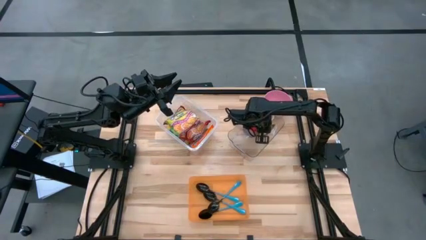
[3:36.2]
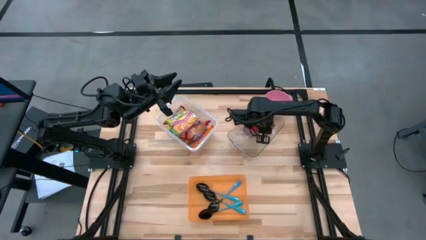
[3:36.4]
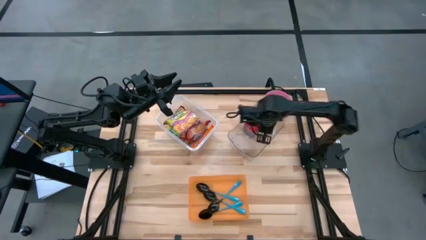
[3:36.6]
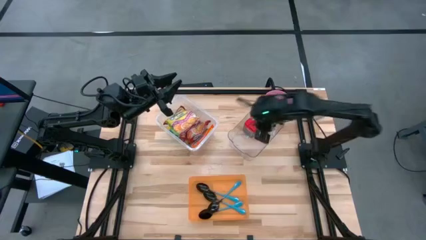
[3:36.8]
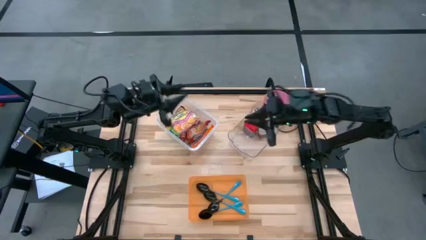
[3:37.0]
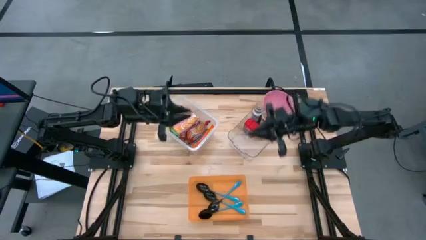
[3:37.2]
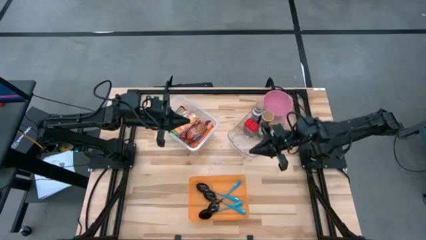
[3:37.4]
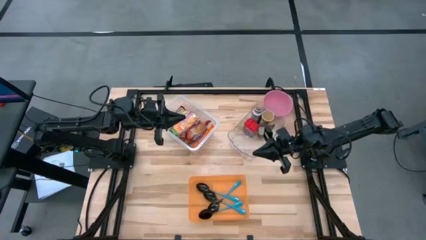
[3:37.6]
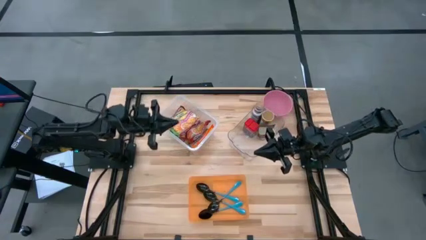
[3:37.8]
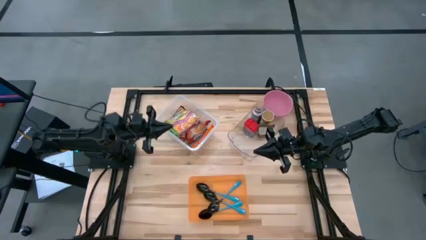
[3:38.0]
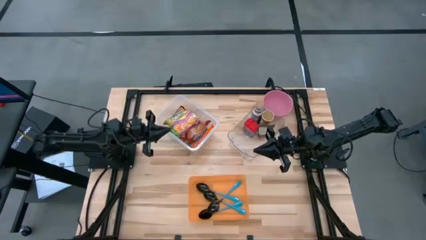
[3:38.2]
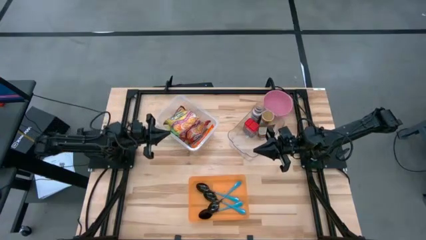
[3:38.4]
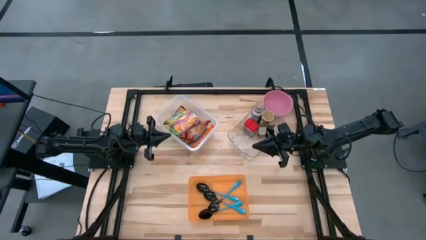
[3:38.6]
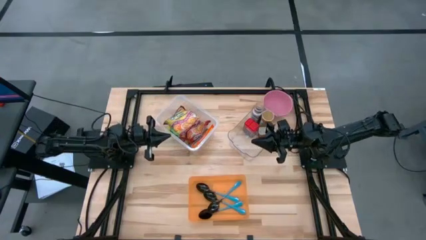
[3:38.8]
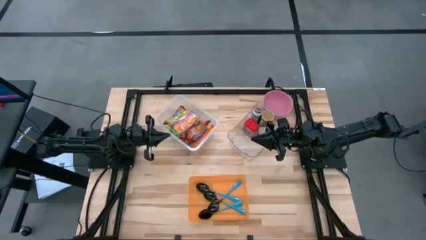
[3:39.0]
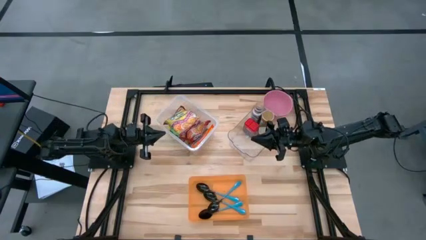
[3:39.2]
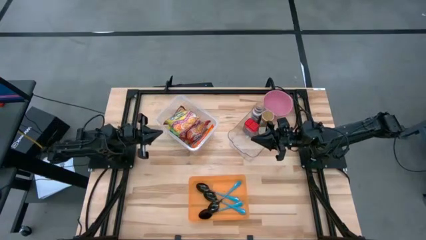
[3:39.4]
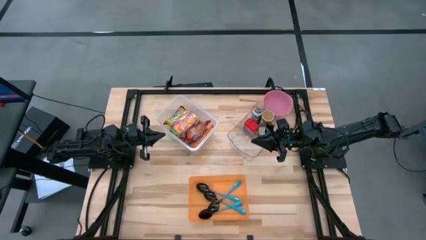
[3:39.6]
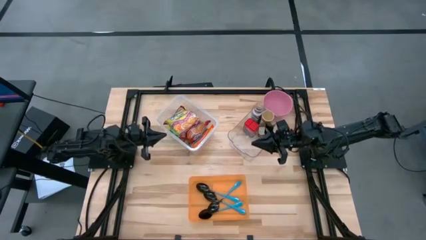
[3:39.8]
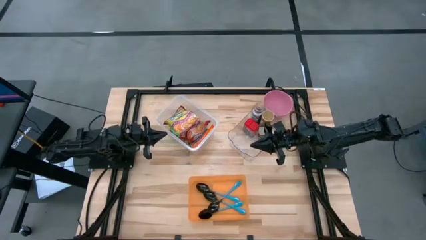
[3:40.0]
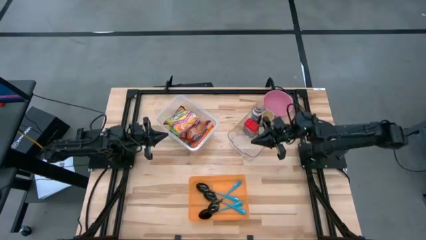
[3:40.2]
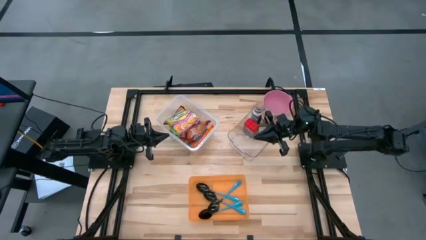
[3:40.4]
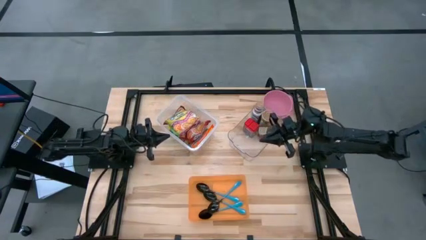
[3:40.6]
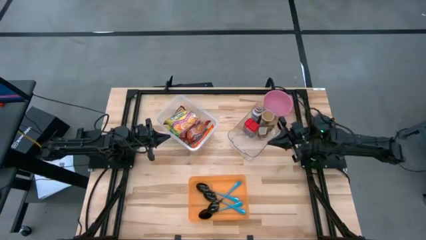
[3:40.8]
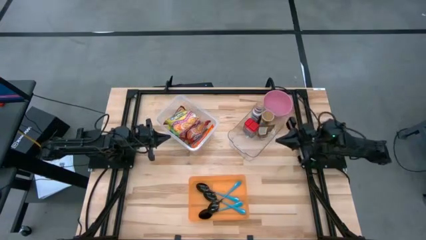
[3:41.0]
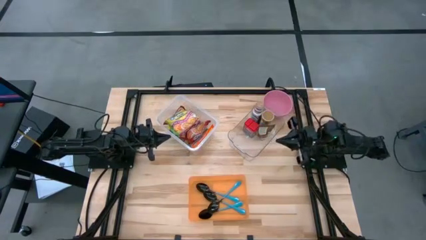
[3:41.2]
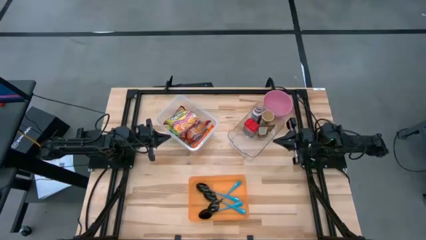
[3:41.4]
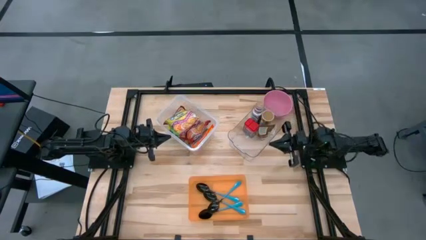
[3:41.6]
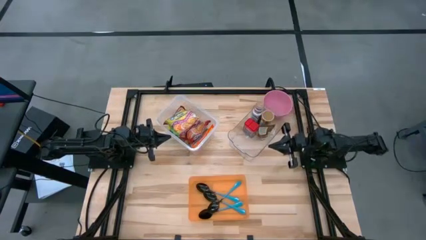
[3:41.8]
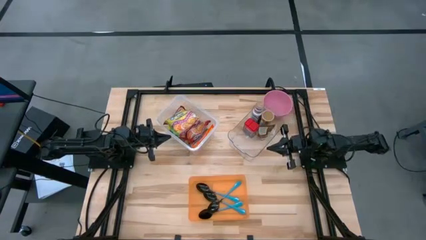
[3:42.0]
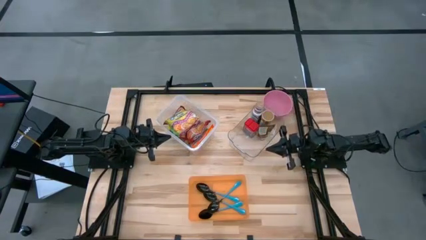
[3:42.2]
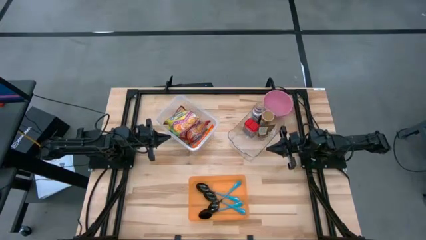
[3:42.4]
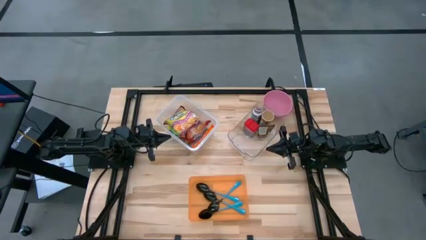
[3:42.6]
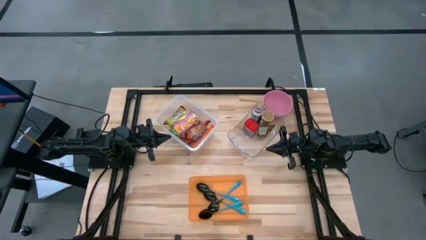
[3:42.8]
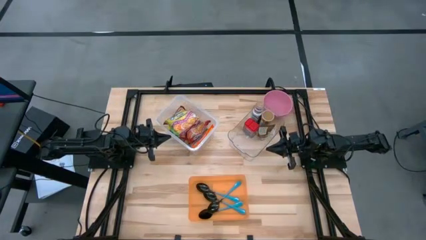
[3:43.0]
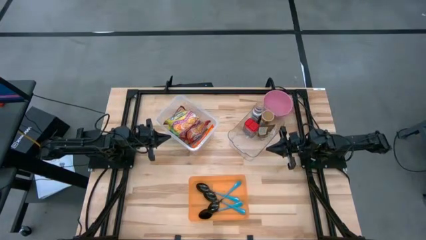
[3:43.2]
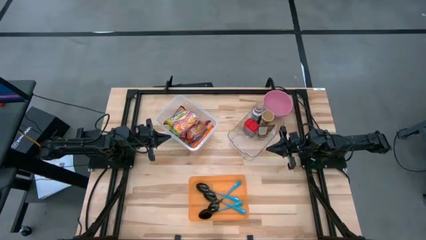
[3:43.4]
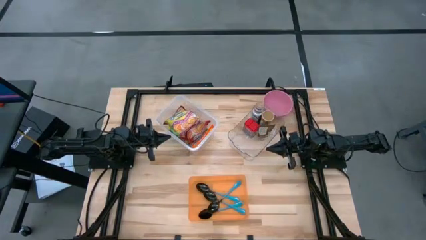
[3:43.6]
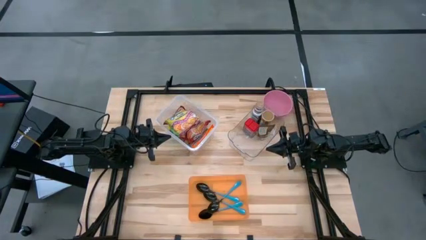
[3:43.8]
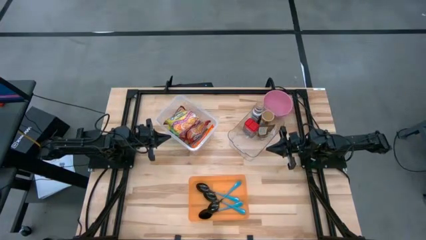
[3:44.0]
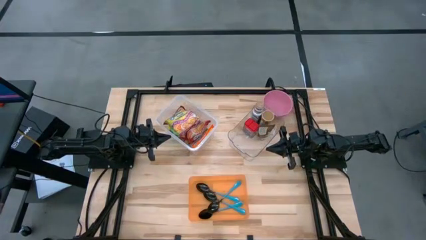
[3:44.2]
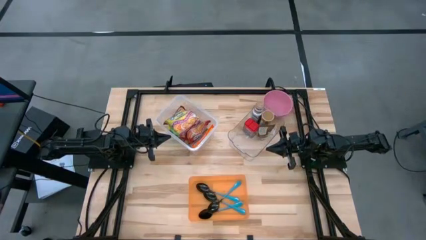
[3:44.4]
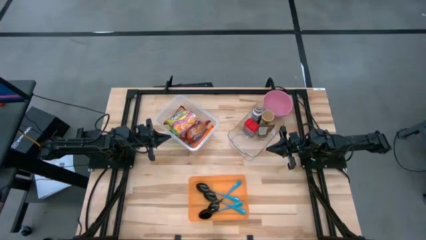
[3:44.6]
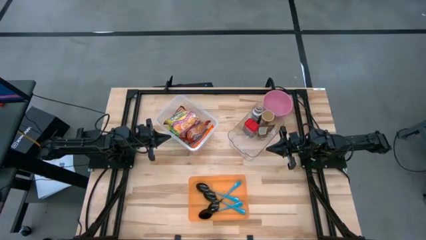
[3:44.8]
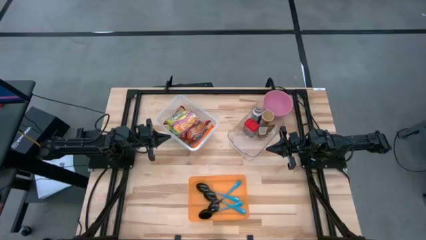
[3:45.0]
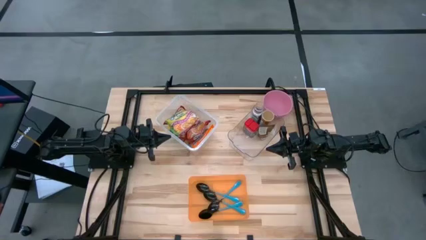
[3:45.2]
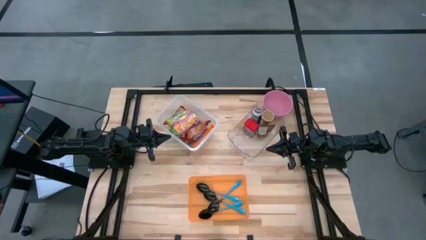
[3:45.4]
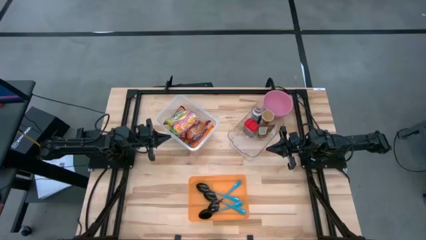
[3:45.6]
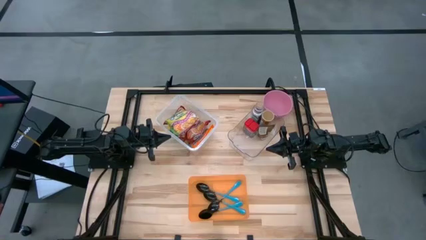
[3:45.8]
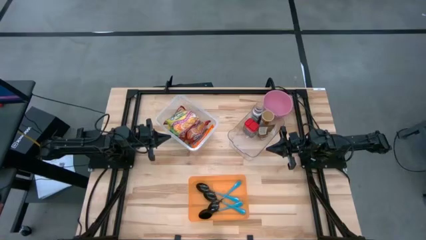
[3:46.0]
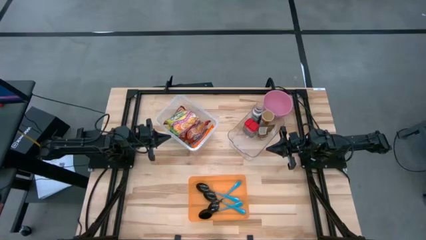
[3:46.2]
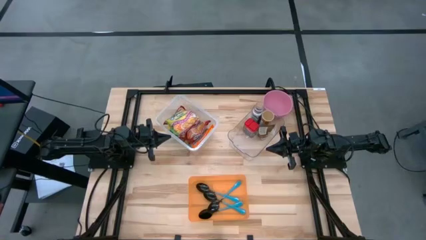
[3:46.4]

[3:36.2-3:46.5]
Task: Pick & Place Food Item
Return to Home Position

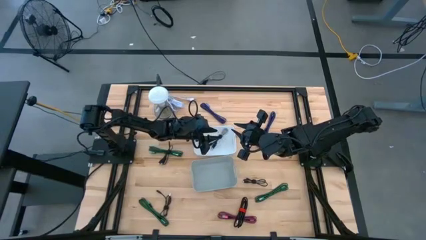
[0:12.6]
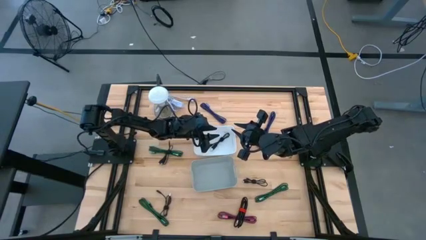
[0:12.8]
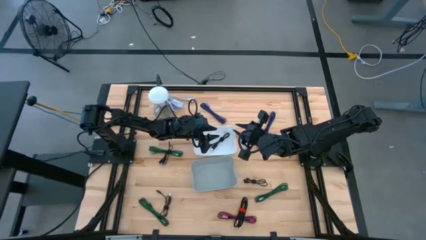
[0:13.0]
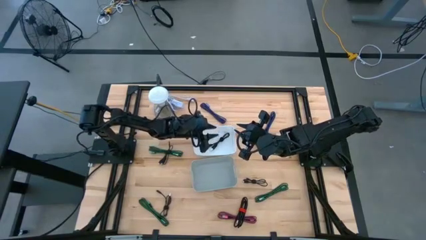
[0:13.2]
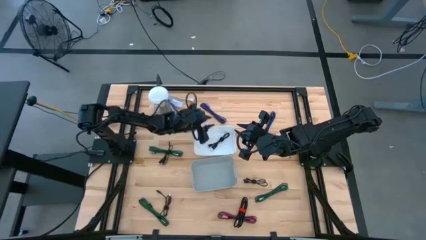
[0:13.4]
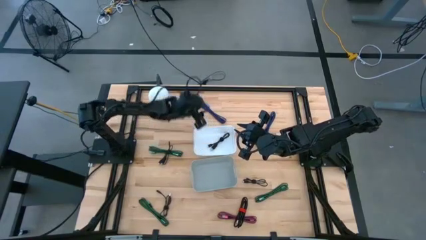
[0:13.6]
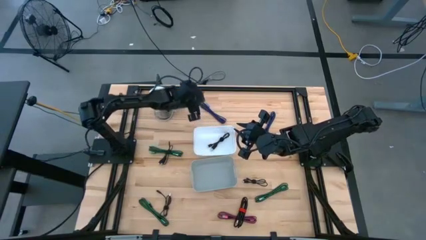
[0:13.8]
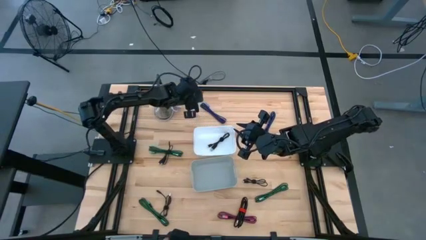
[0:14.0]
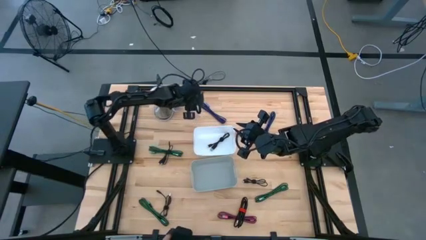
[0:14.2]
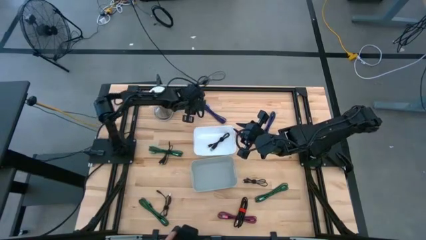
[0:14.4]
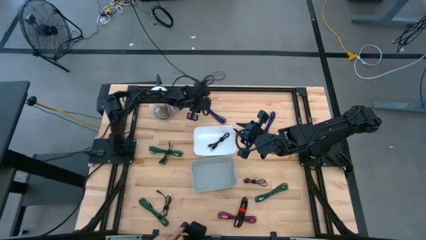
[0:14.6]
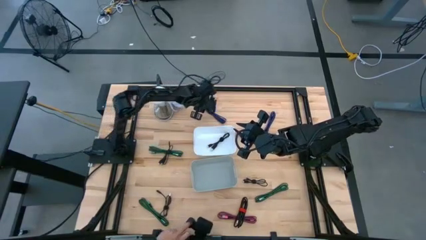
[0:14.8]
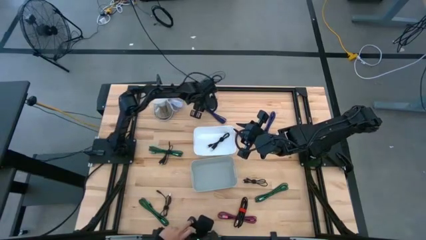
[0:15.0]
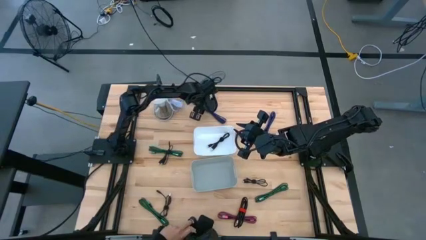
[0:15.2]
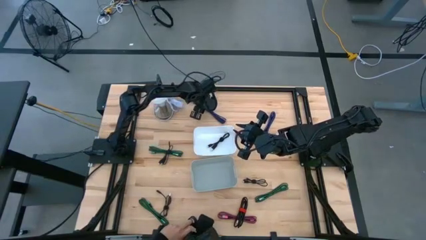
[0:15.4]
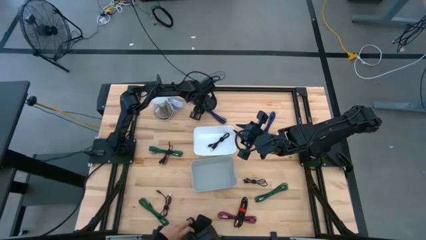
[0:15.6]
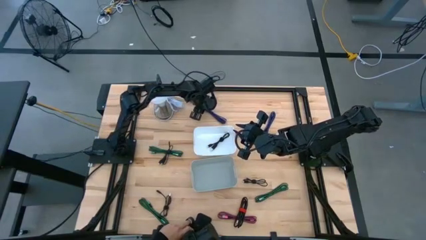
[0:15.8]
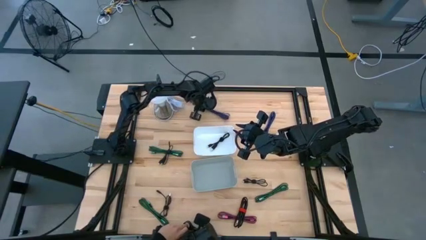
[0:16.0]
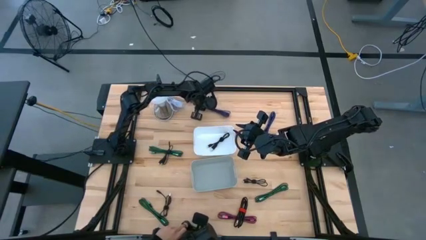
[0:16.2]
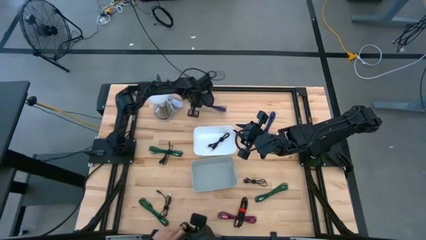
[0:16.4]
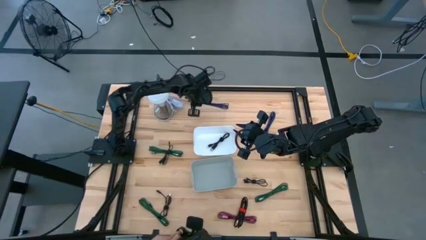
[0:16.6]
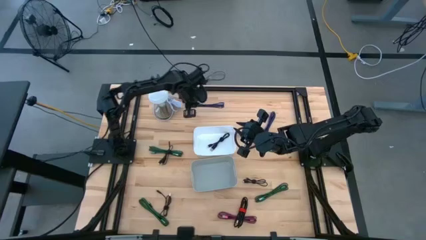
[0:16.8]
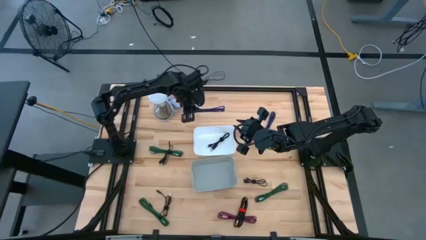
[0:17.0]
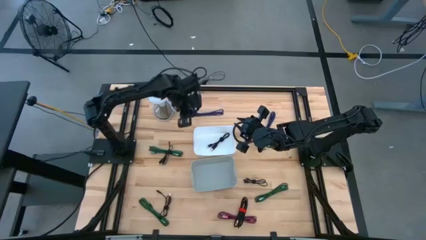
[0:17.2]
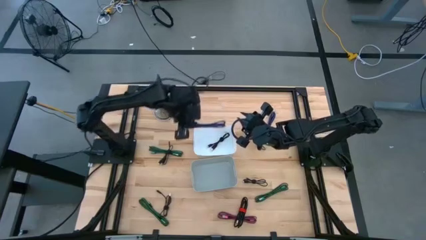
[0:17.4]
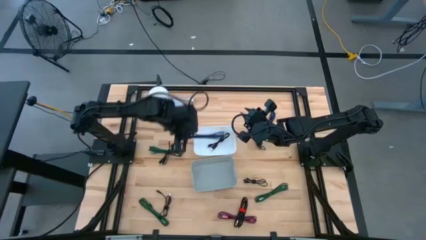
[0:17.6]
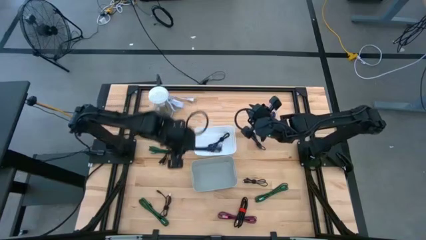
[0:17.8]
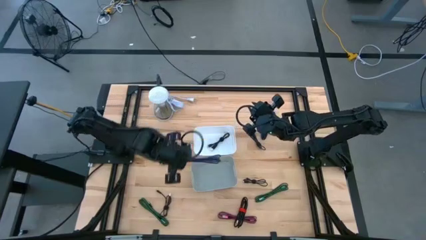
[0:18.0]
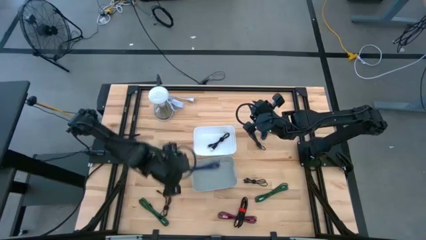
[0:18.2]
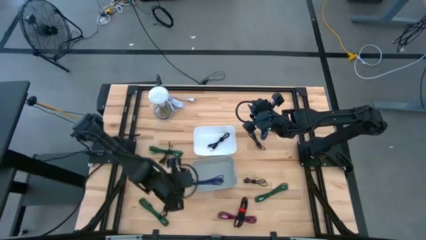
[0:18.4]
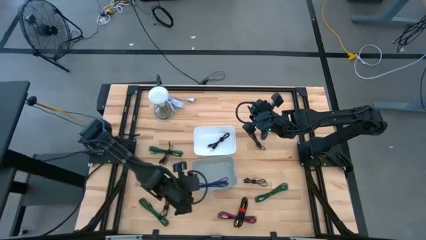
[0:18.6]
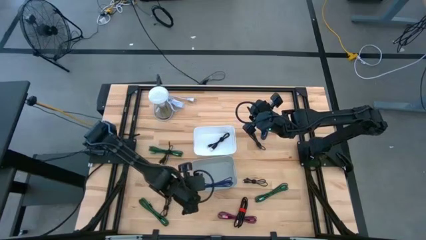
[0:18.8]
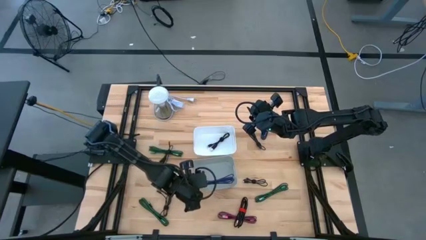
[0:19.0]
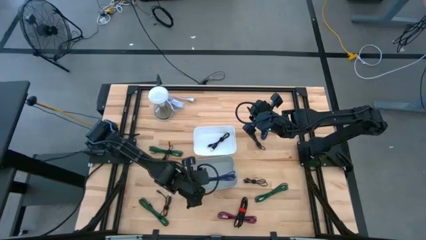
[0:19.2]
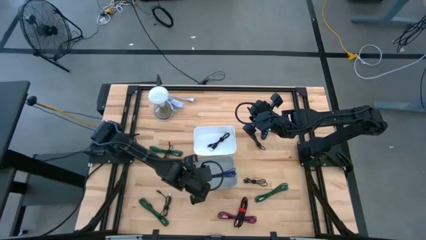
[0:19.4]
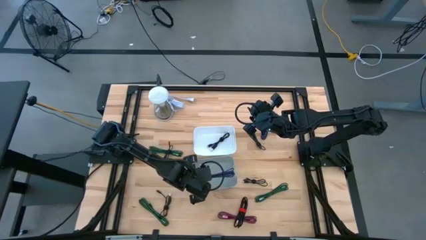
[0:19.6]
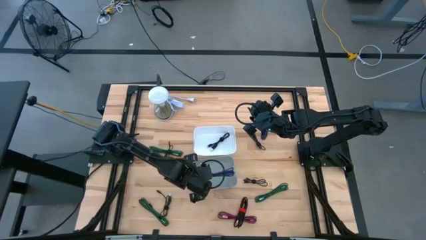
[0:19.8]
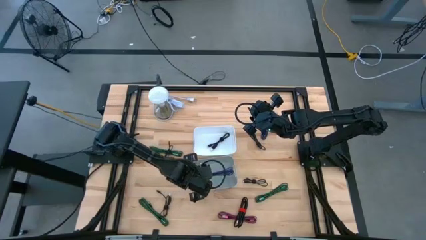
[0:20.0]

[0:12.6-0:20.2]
Task: Pick & Place USB Port
Put the violet charger cable into the gray container
